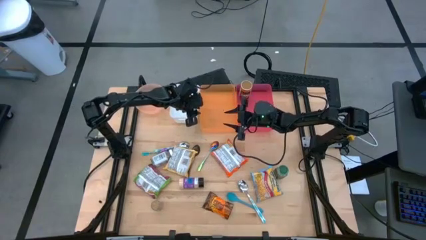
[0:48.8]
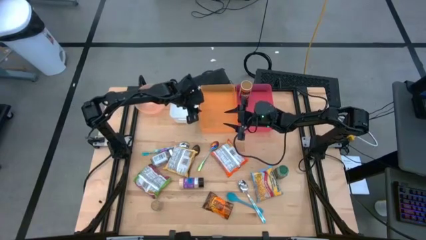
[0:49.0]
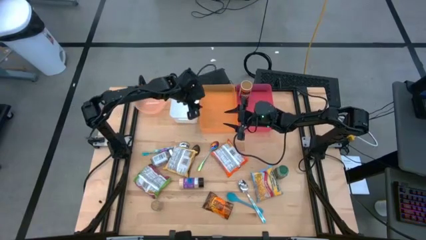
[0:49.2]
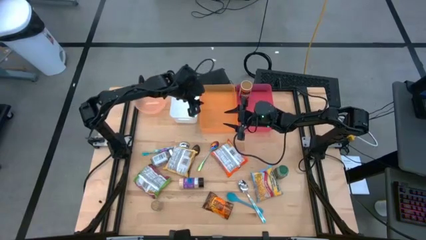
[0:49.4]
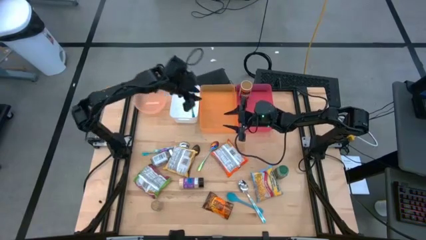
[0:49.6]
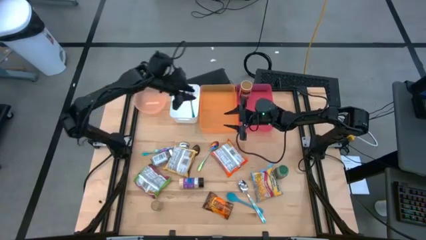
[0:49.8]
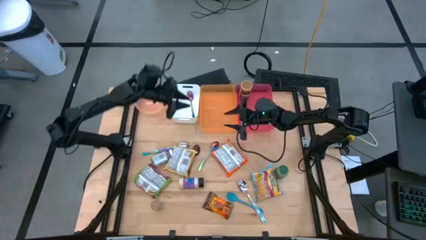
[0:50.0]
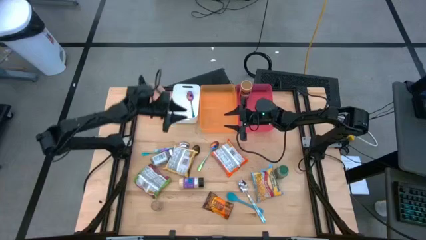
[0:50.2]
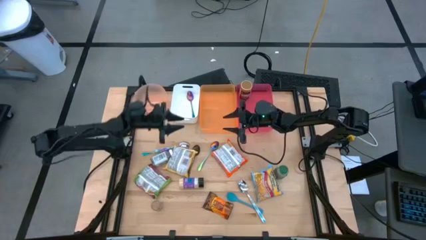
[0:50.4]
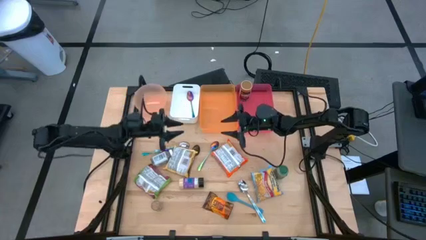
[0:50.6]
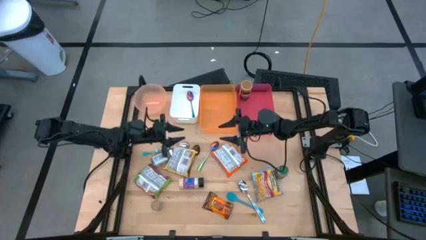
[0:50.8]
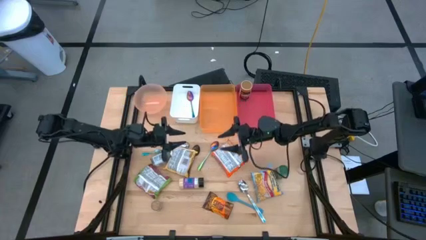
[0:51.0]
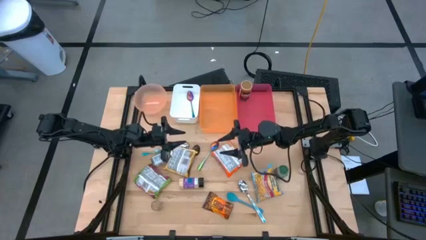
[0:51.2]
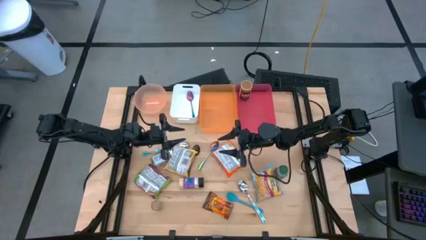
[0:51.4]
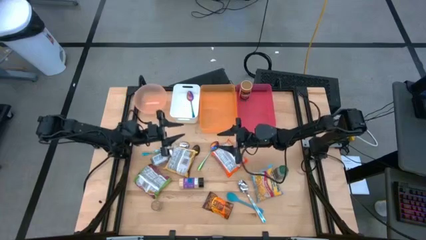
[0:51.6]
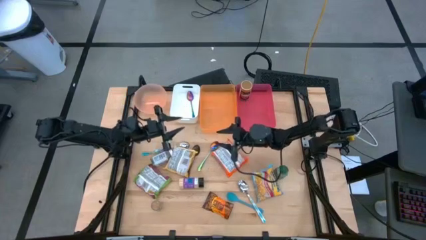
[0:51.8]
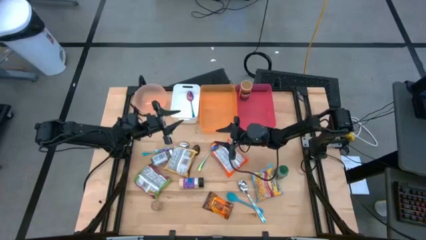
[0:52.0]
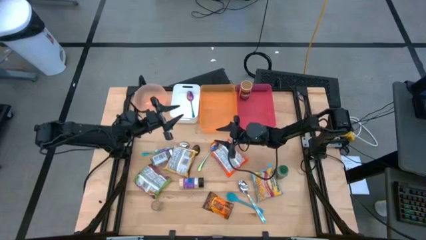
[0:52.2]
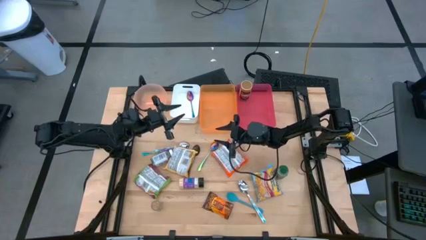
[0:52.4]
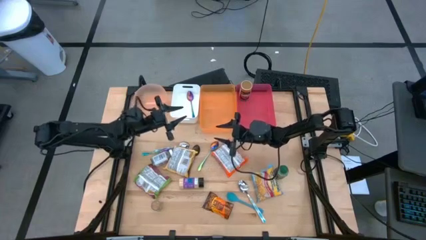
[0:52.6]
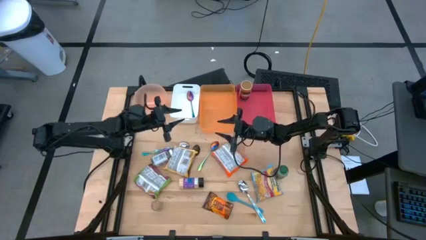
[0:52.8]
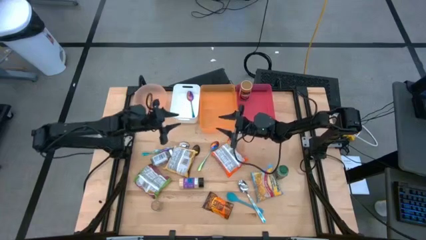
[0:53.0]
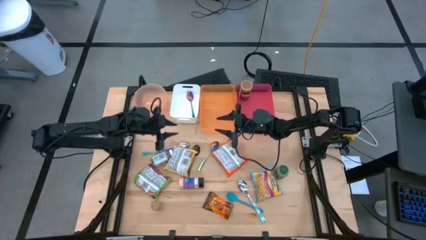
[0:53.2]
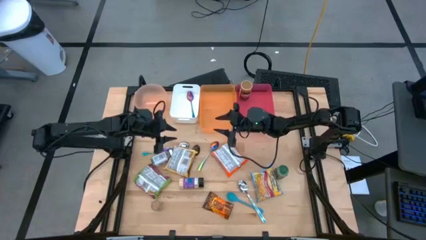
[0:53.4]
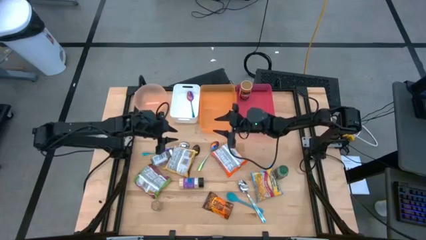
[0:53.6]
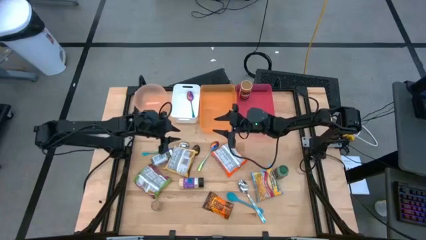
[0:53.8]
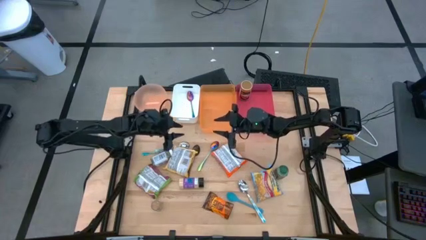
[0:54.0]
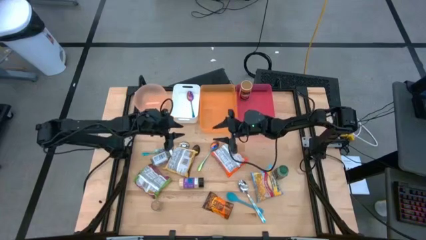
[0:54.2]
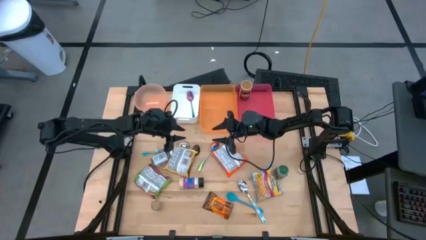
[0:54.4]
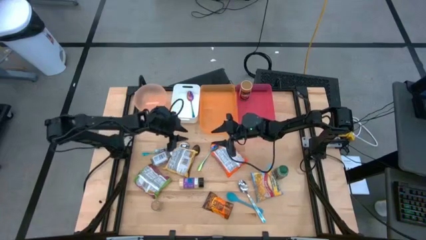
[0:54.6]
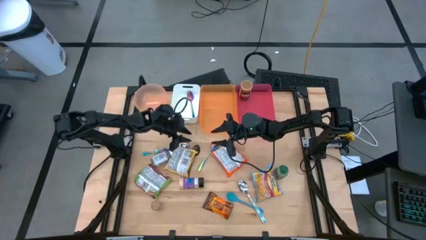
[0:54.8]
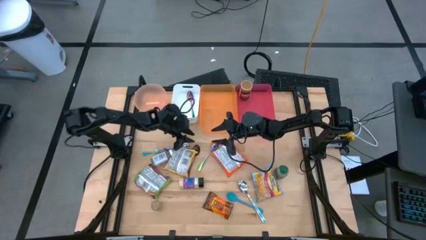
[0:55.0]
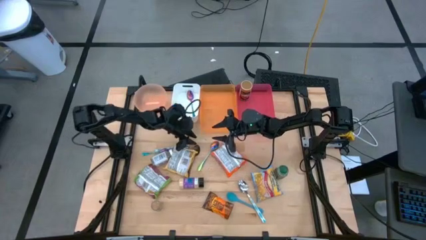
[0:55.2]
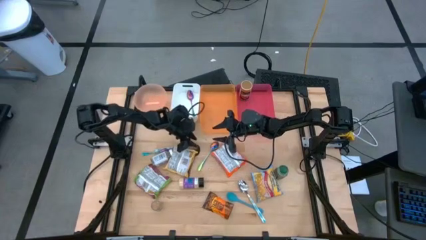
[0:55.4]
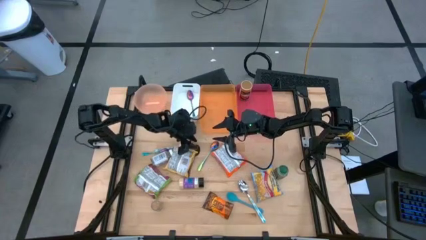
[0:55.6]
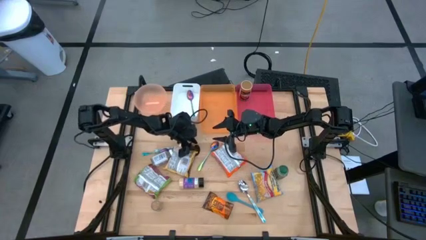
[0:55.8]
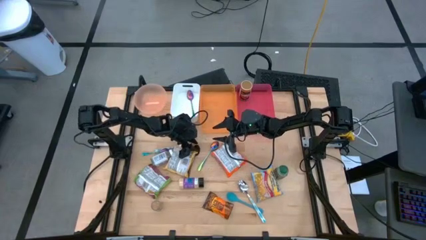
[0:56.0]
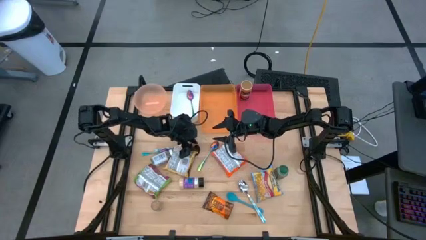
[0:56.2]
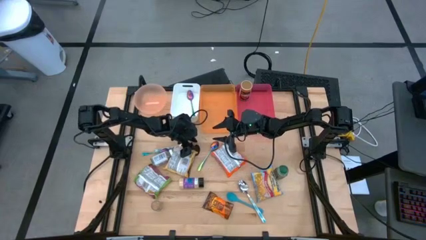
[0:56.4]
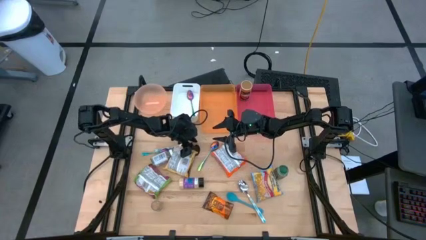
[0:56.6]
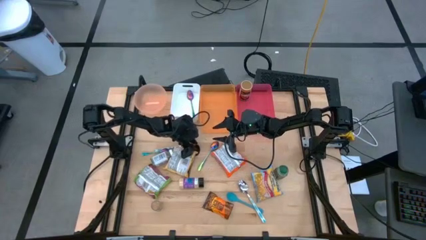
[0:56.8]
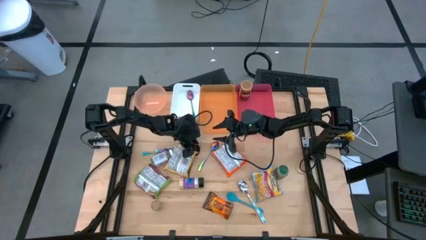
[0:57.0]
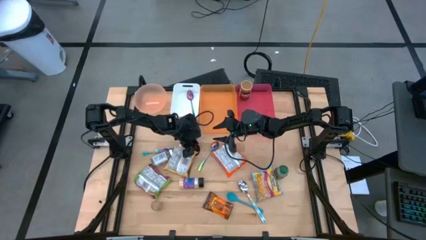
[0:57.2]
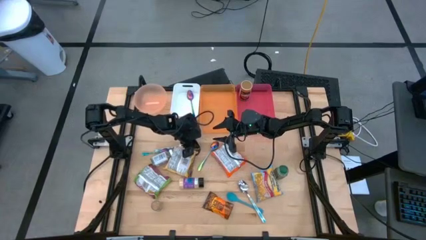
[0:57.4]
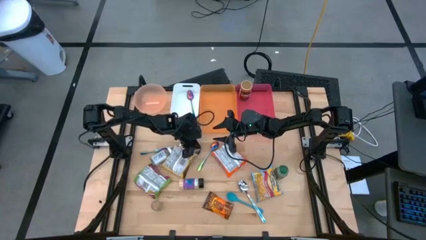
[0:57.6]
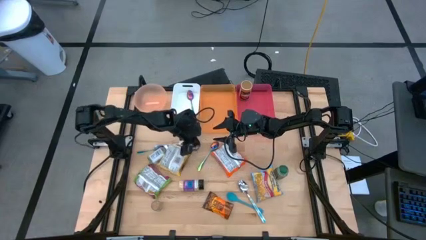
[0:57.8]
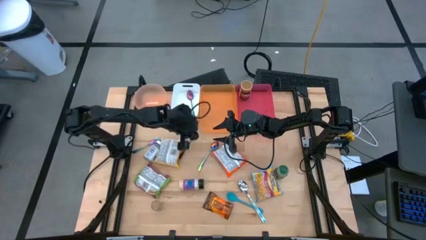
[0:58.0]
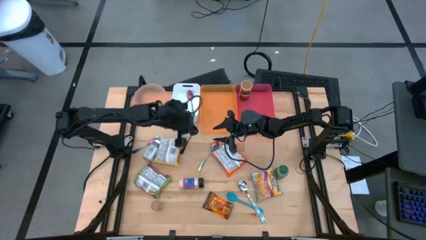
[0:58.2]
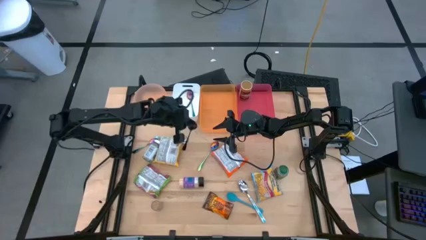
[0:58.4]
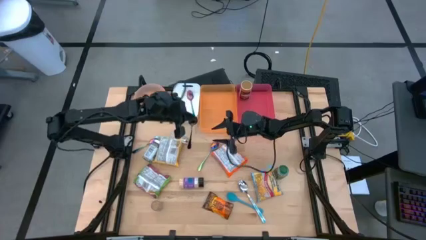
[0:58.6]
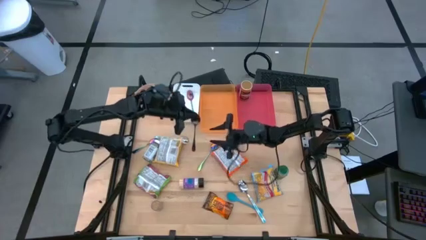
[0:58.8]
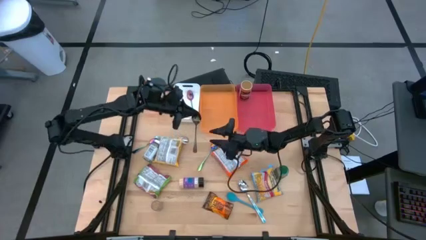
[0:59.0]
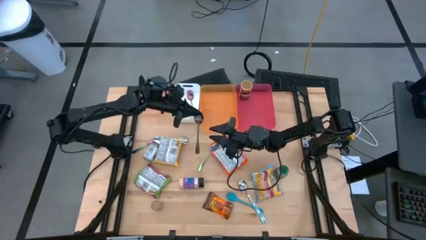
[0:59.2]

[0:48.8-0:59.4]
Task: Pick & Place Food Item
Put the black spoon into the white bin

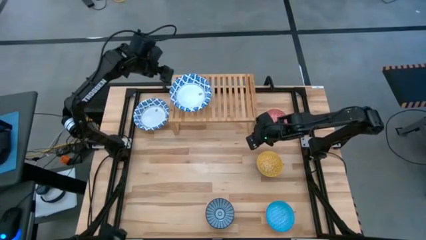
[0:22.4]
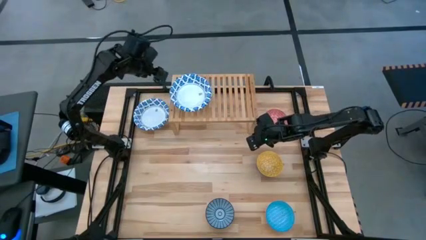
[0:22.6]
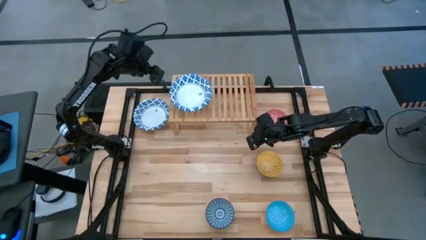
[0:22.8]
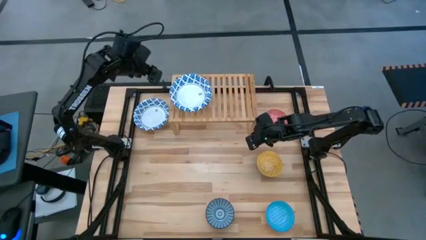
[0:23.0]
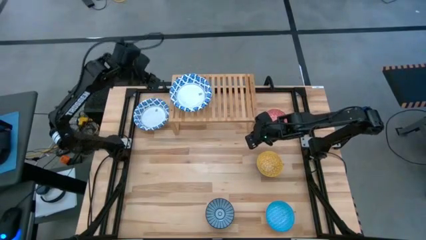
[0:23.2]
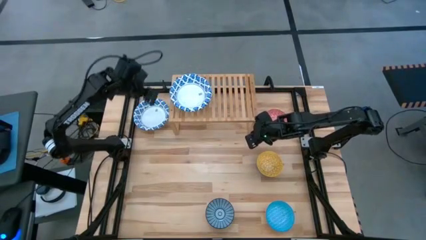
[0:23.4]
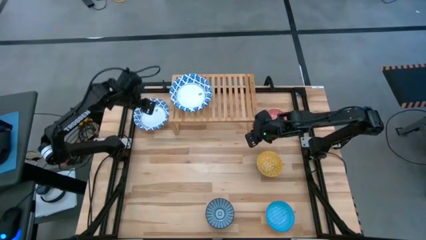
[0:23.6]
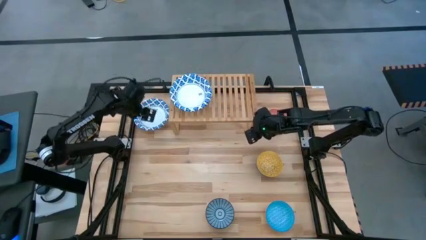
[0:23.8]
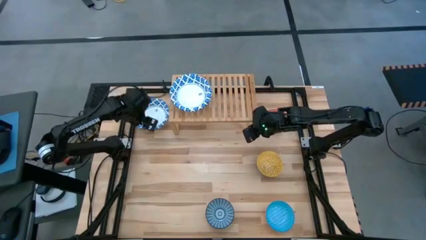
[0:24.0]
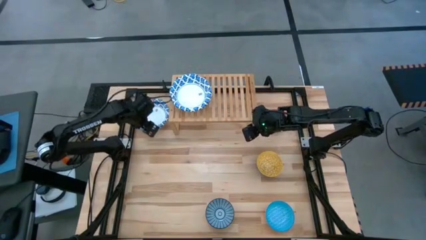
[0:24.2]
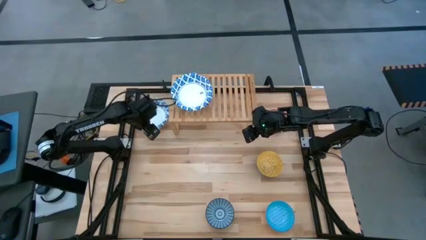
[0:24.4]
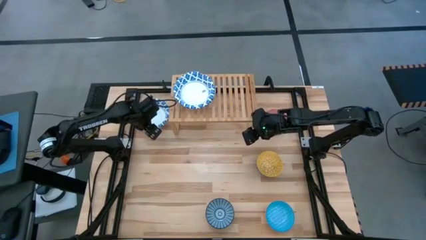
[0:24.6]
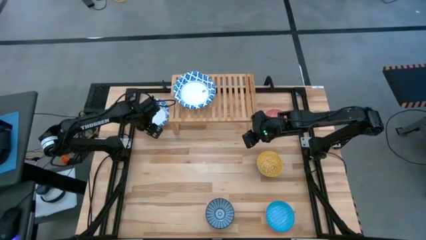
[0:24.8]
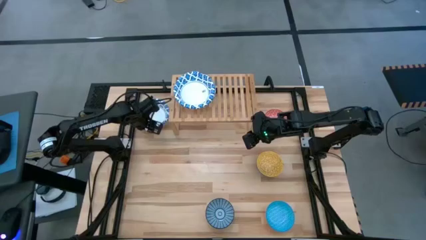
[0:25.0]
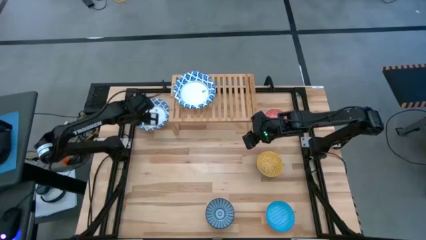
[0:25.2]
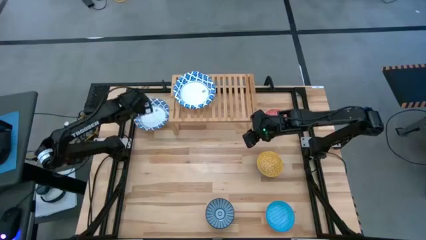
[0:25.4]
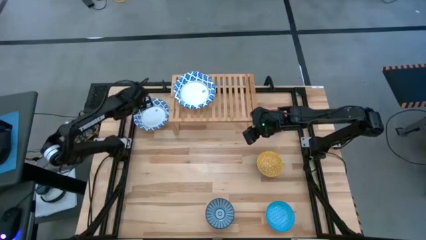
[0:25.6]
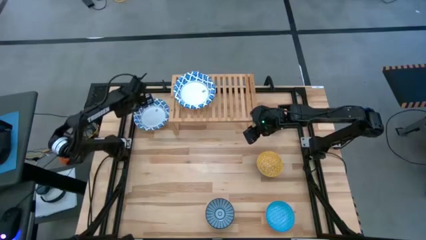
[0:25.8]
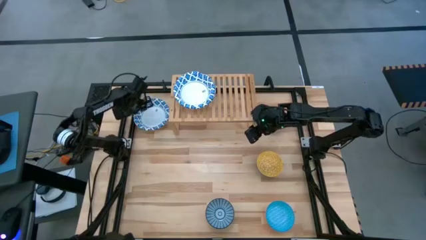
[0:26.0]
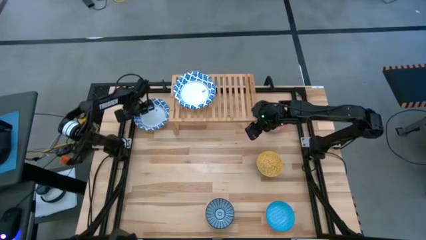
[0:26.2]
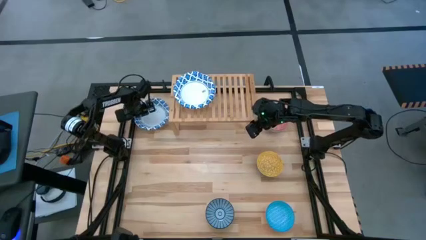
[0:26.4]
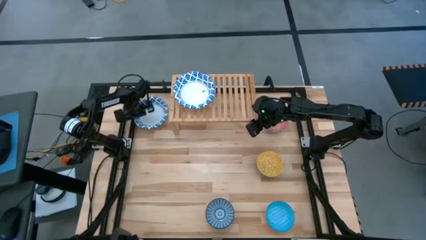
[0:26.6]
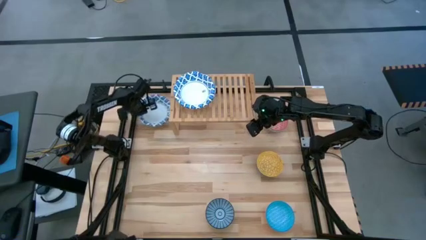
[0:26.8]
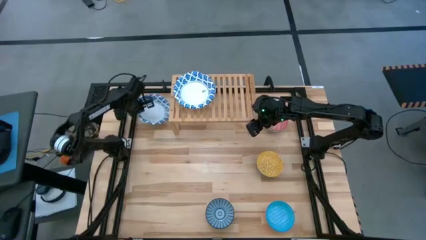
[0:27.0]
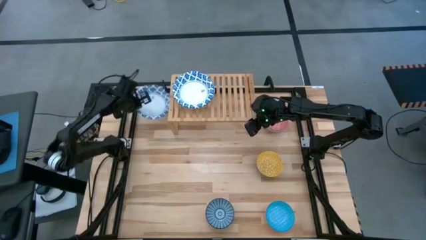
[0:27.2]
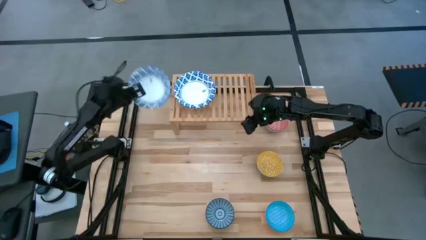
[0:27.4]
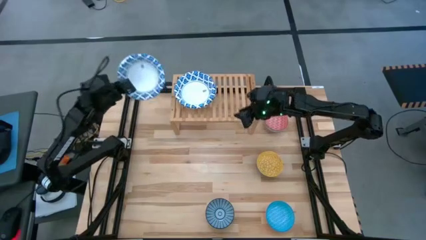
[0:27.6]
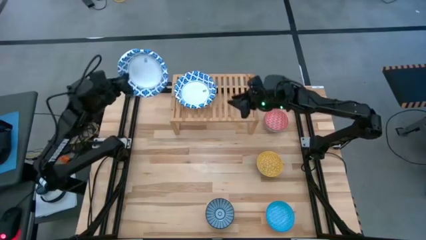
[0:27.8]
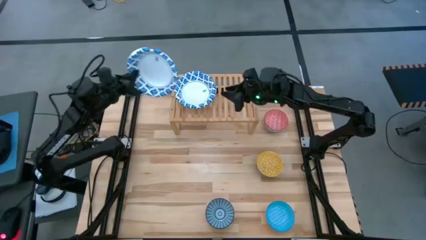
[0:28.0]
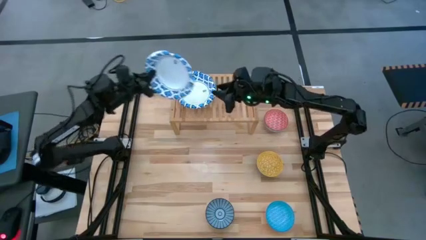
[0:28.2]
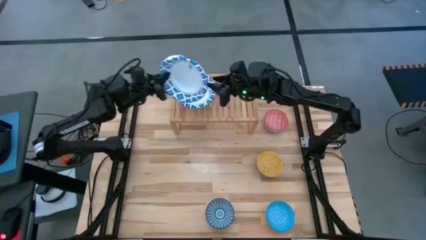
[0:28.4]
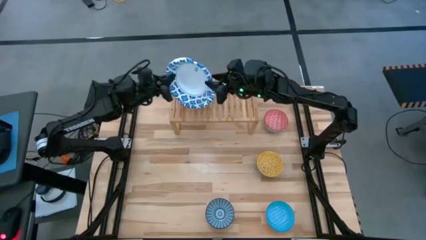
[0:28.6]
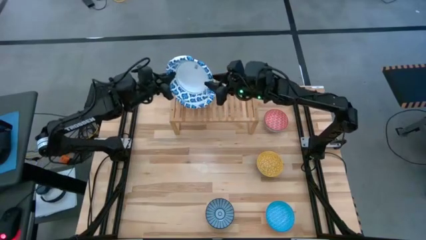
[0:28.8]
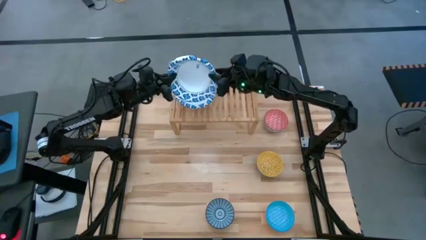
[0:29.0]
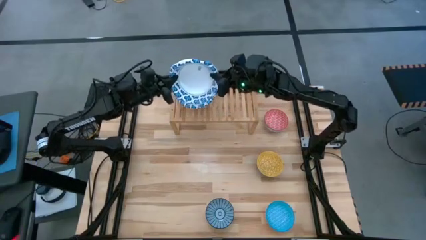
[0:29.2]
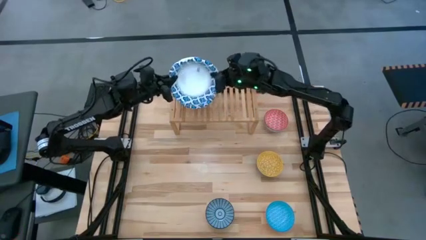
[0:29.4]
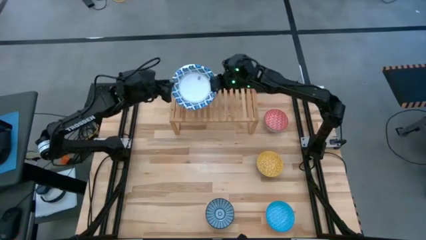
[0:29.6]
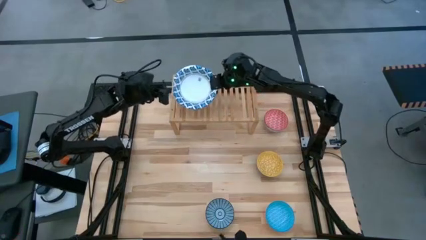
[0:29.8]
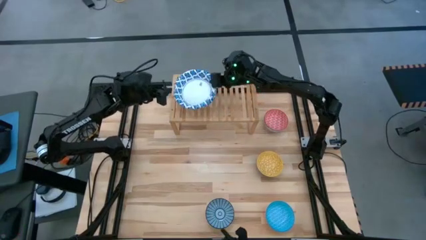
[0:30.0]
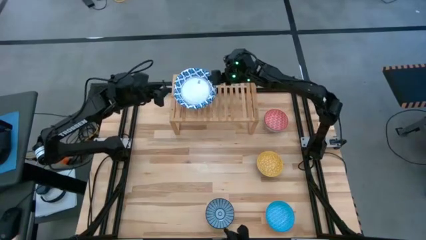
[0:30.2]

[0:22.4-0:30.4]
Task: Place and stack bowls onto a shelf
Stack the big white bowl on top of the big white bowl
